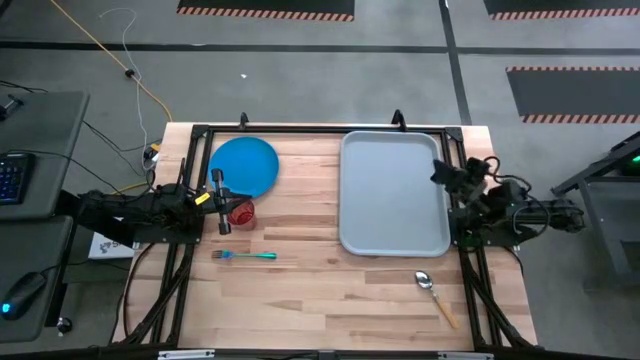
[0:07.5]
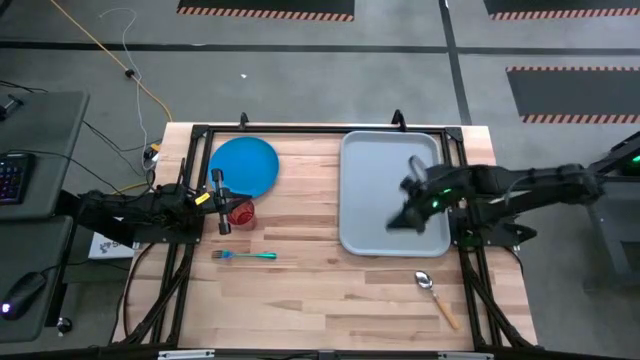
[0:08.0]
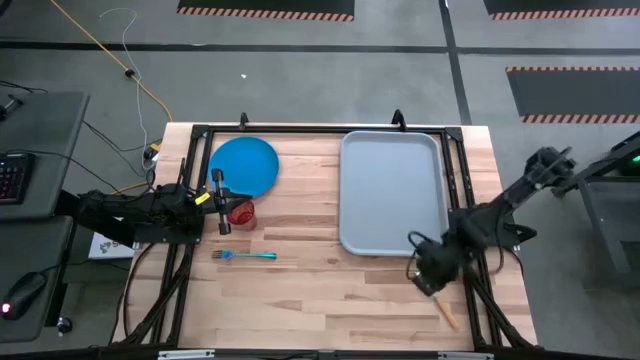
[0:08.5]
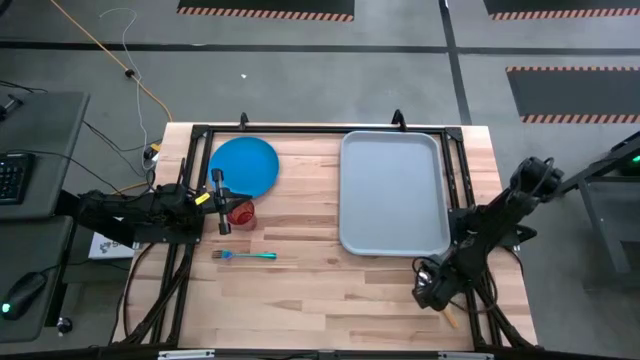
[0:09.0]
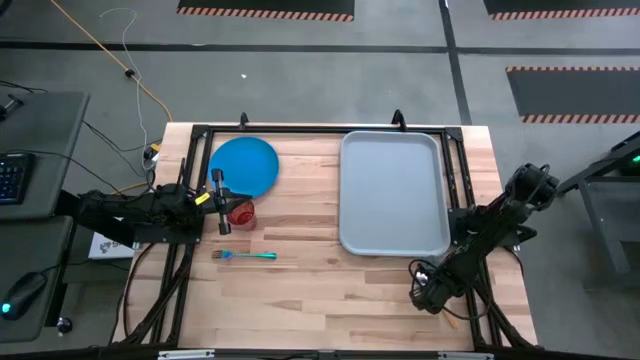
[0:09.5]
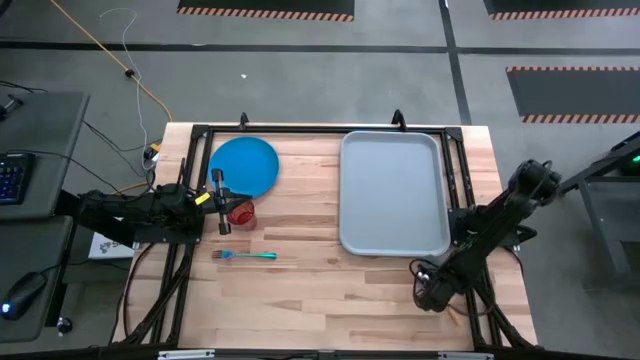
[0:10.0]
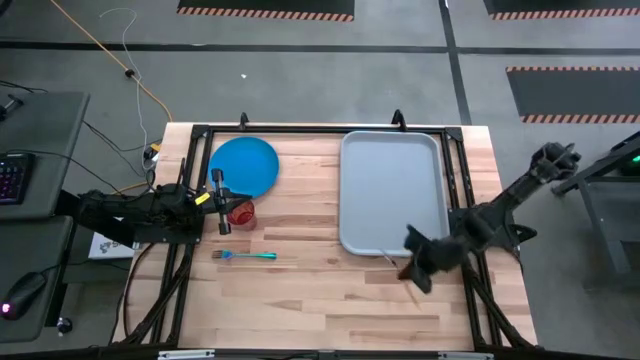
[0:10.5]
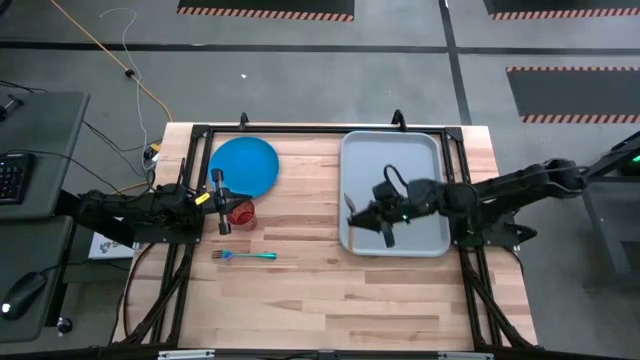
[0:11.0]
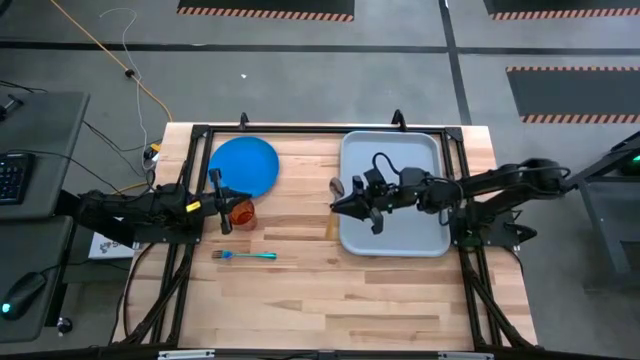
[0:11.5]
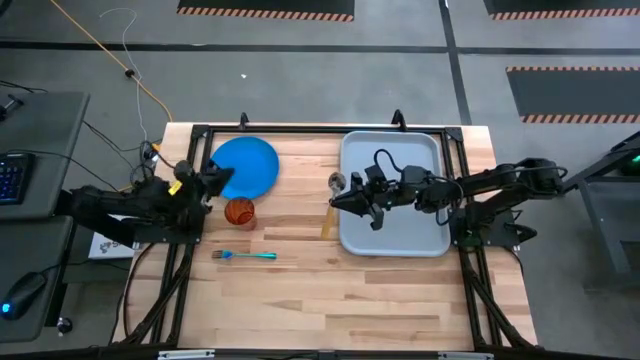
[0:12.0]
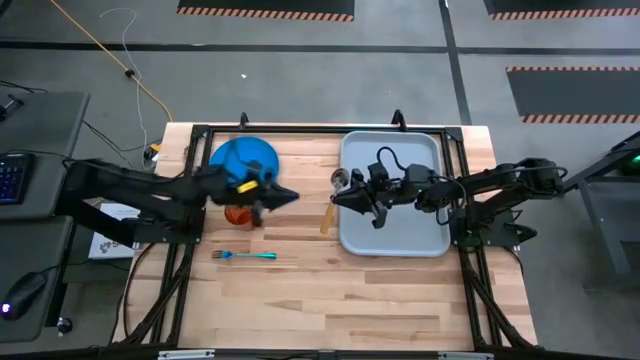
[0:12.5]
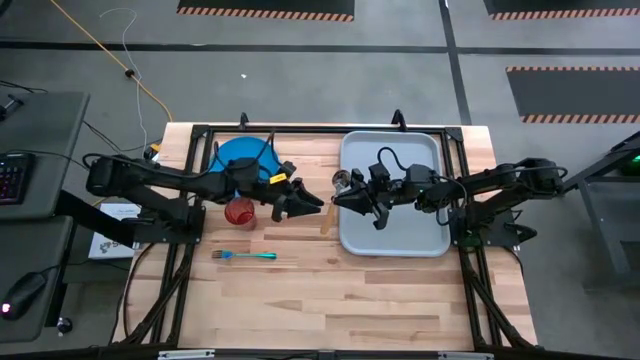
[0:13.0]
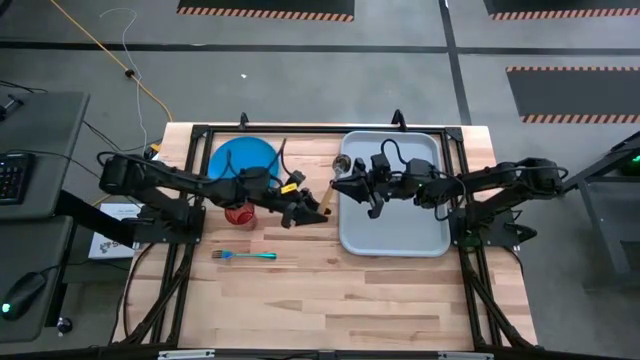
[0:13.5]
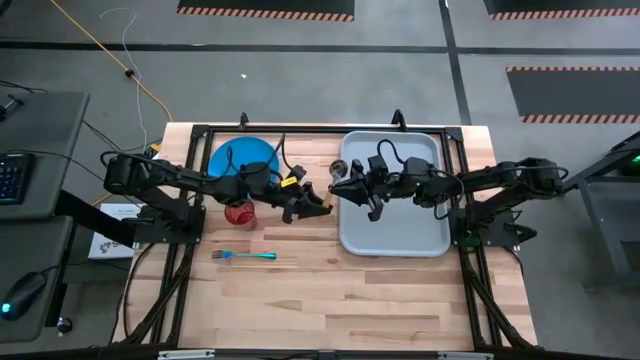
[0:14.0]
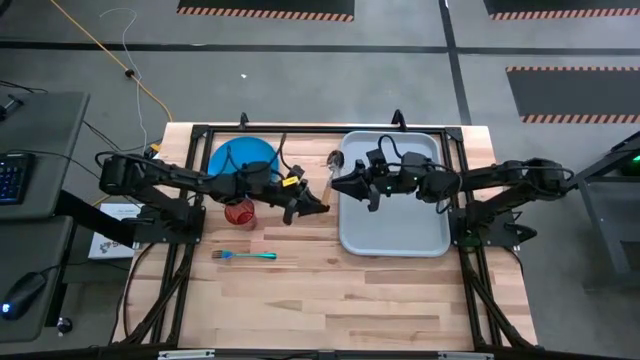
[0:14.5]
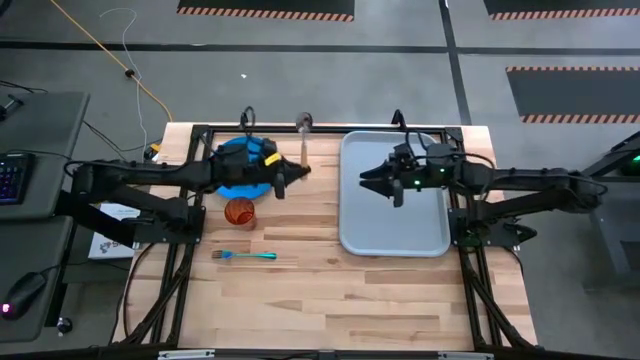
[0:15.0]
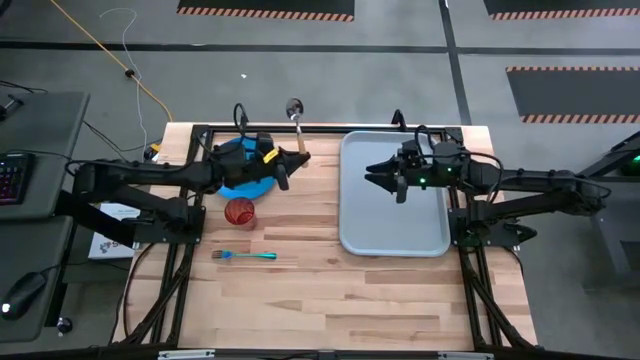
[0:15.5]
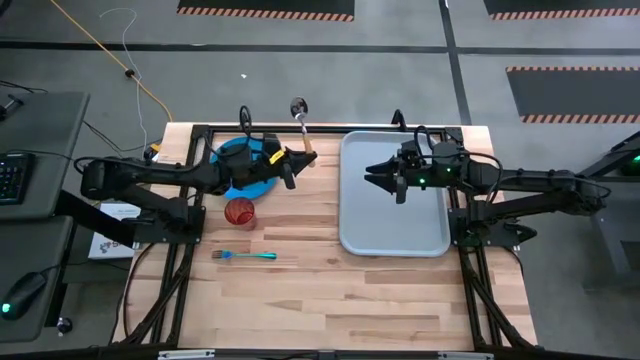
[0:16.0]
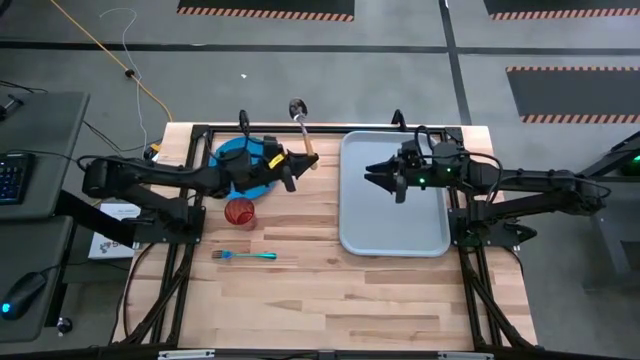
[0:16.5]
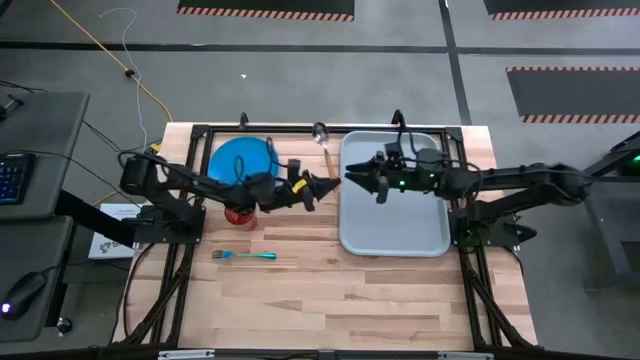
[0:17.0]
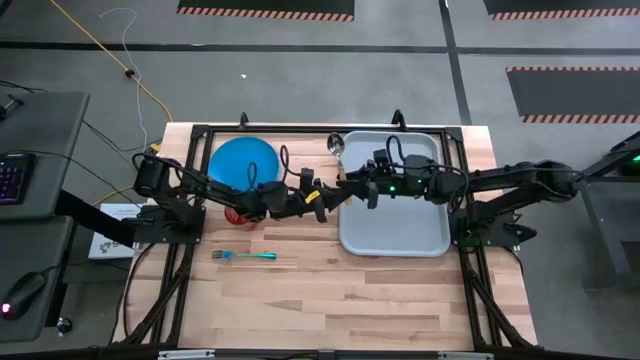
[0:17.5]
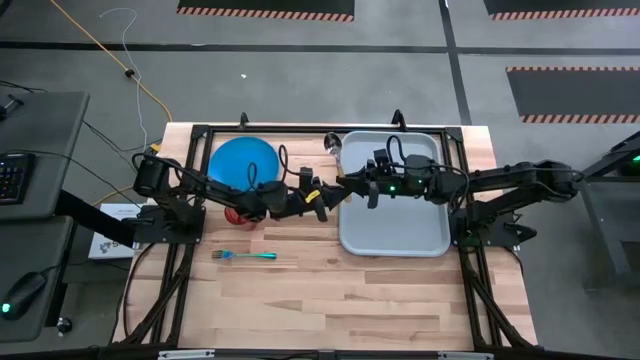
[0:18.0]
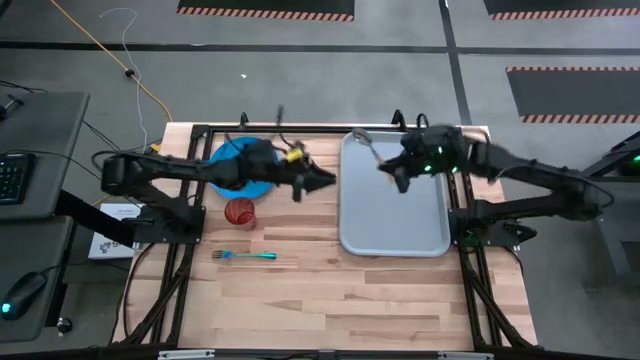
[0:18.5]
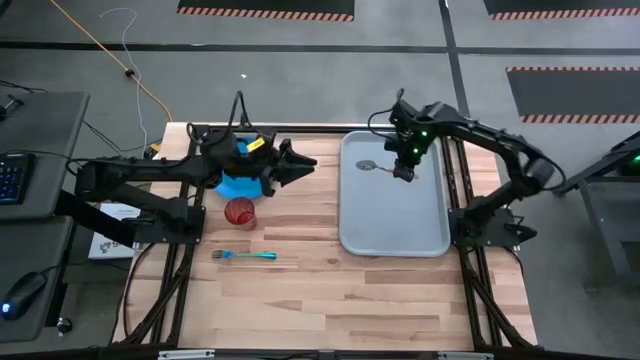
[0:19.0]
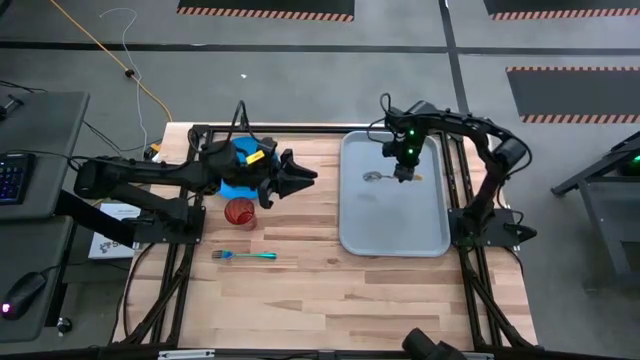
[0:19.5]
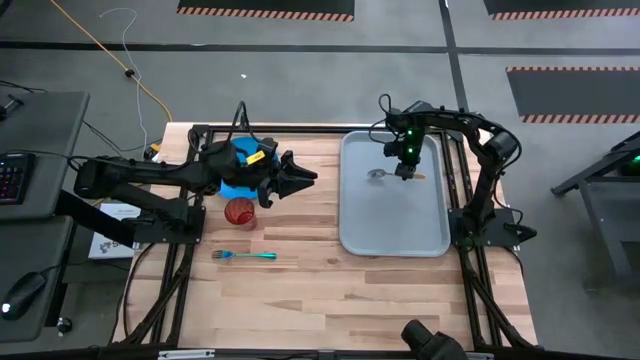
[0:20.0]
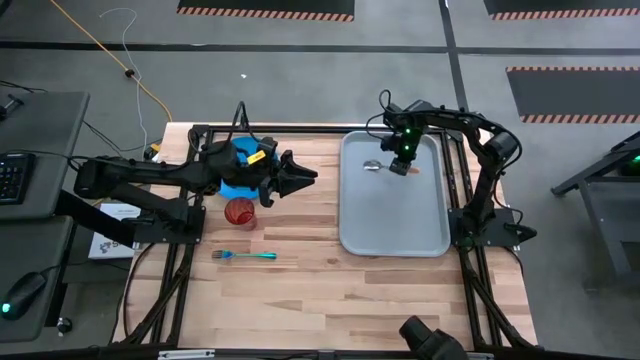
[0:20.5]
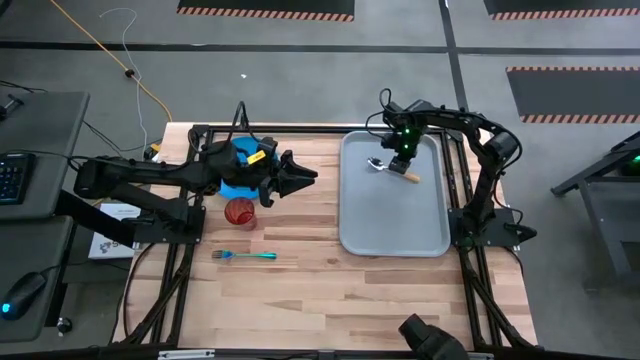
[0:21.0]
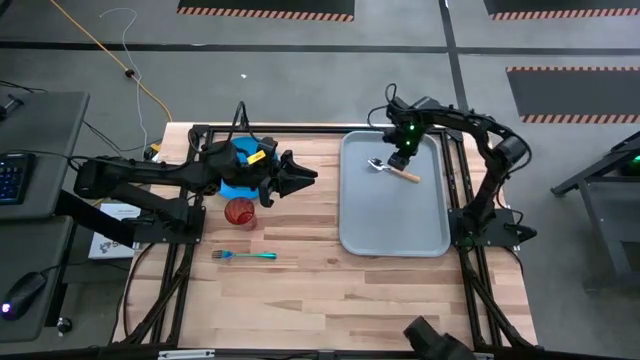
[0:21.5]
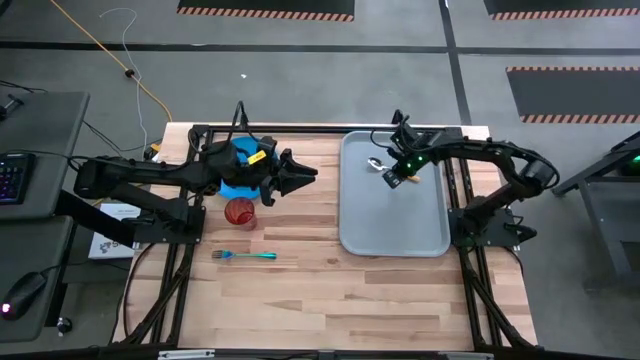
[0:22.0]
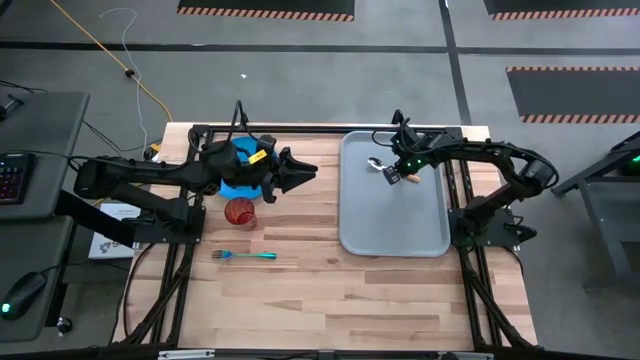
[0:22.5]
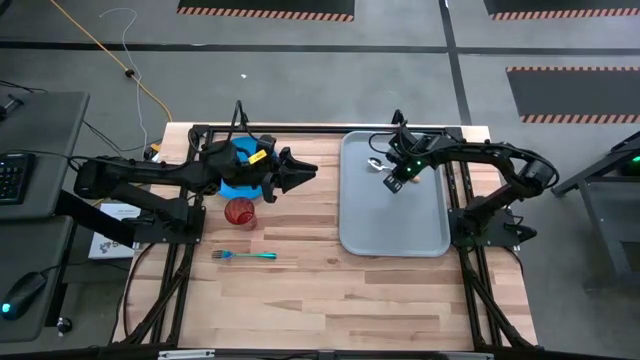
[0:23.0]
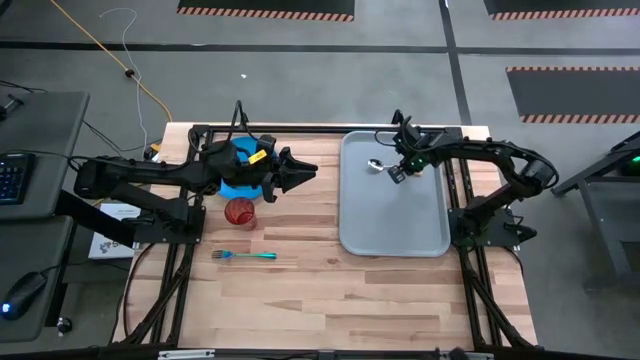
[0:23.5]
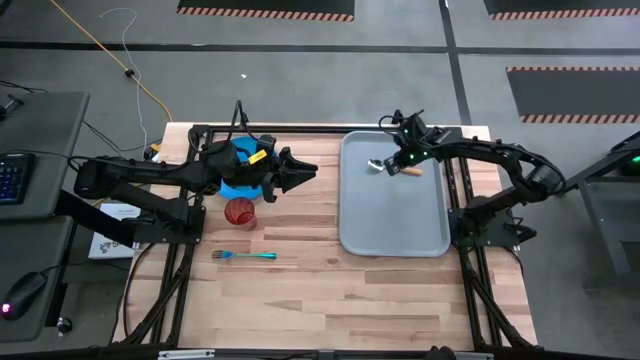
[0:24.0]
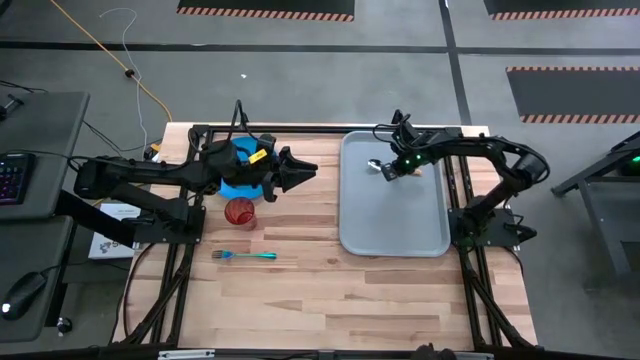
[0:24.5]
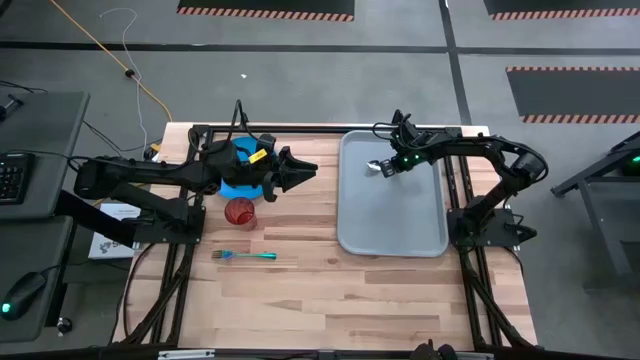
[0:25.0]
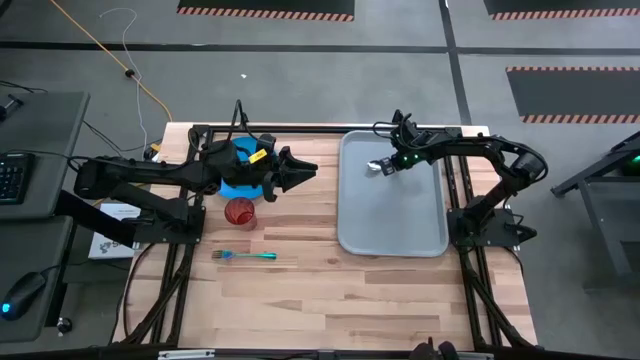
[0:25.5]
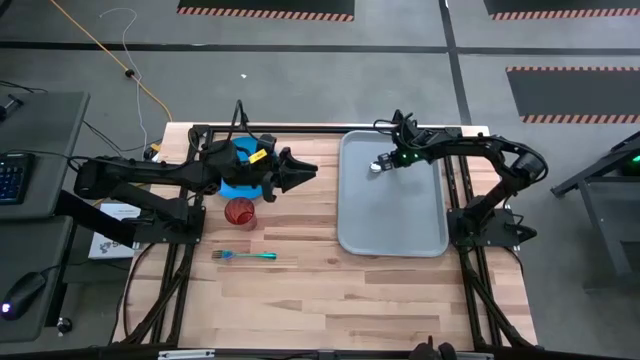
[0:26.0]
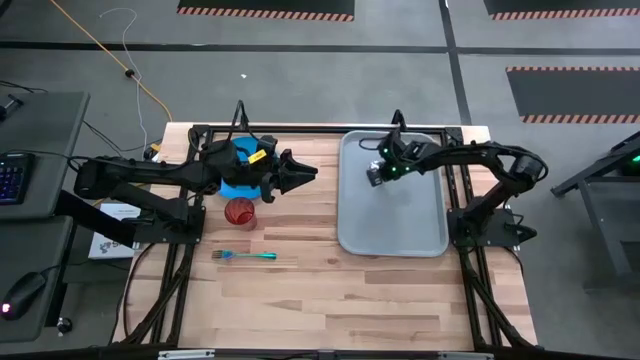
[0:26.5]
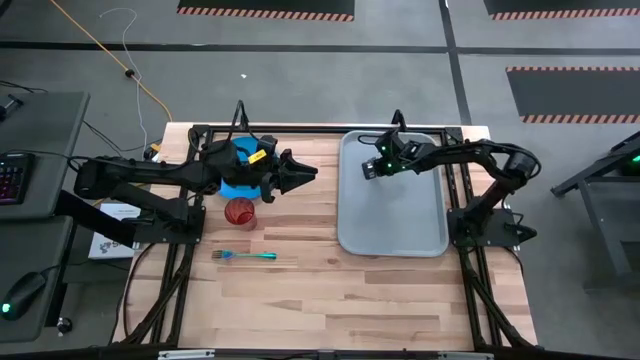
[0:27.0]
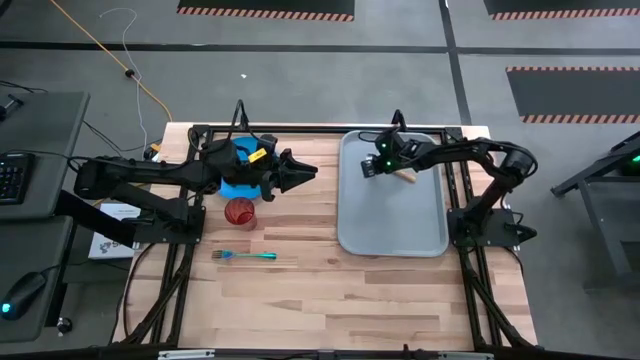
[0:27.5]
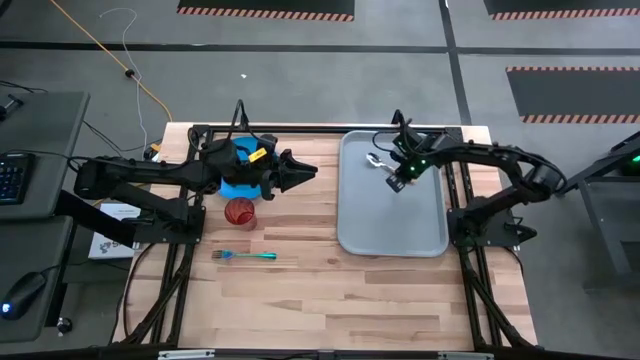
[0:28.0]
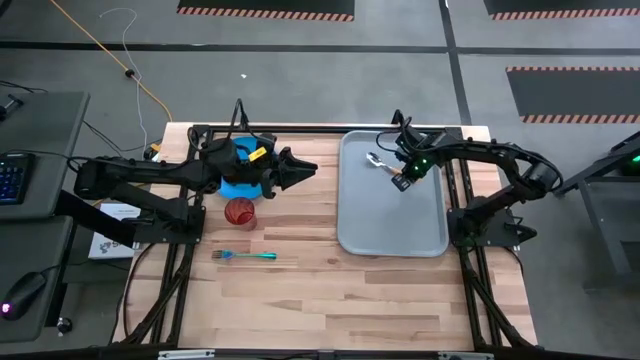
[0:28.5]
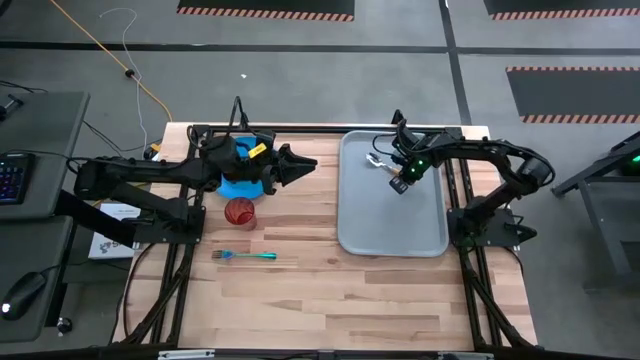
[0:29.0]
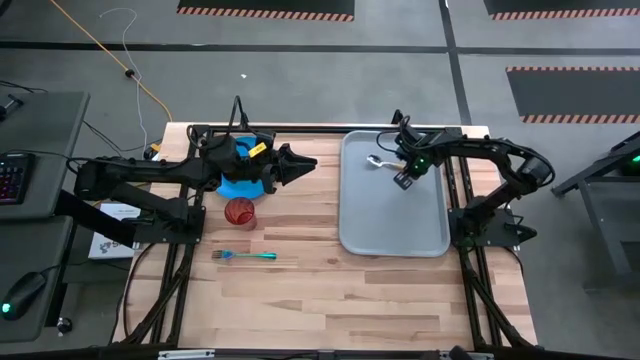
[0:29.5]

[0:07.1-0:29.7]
Task: Pick and place plate/cup/fork/spoon on tray
Put the yellow spoon on the gray serving tray
